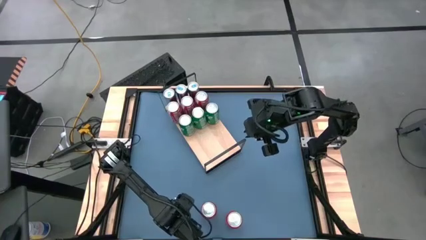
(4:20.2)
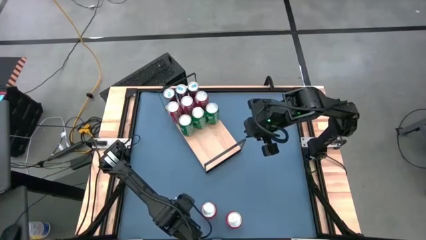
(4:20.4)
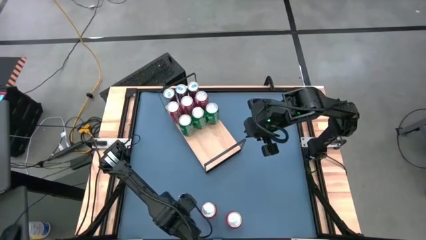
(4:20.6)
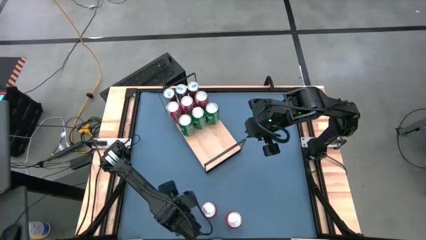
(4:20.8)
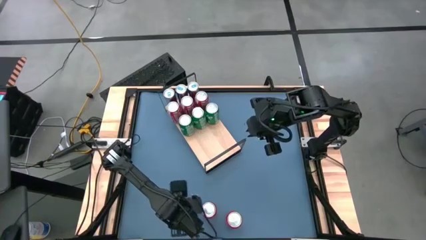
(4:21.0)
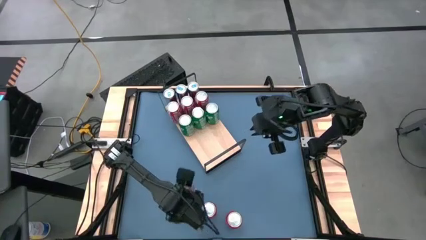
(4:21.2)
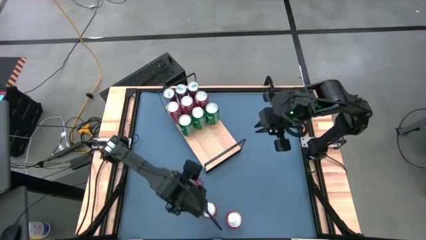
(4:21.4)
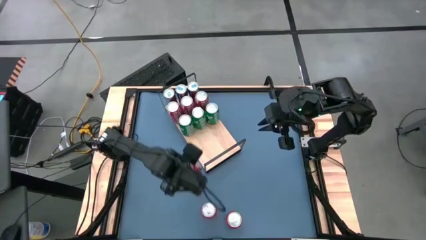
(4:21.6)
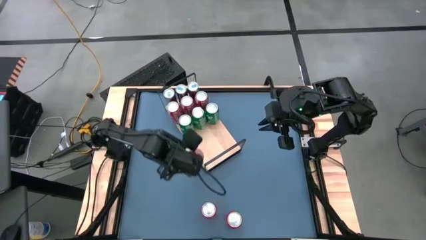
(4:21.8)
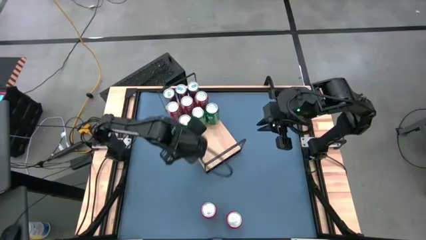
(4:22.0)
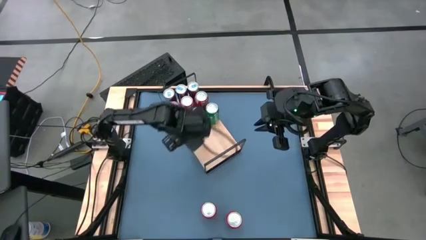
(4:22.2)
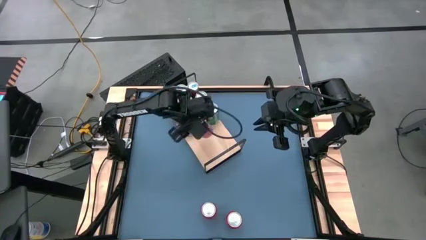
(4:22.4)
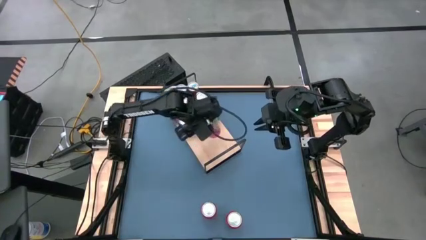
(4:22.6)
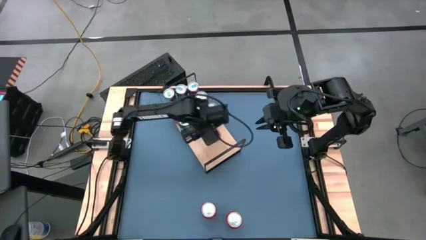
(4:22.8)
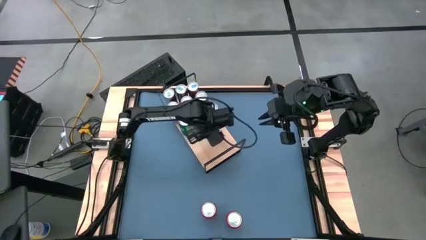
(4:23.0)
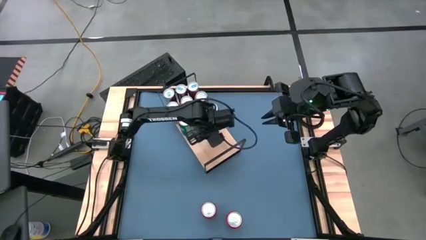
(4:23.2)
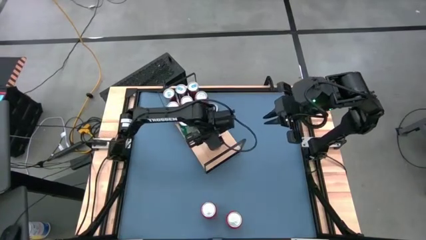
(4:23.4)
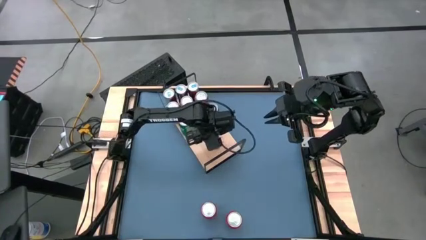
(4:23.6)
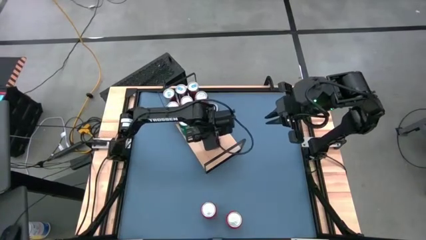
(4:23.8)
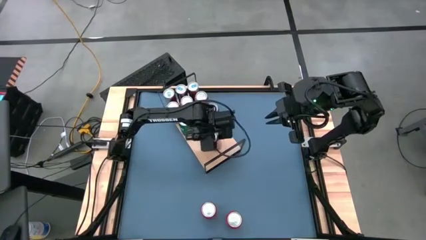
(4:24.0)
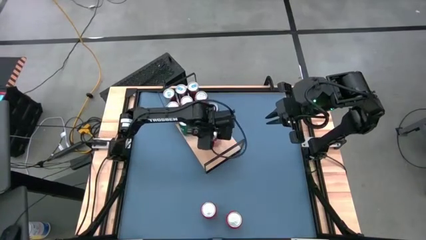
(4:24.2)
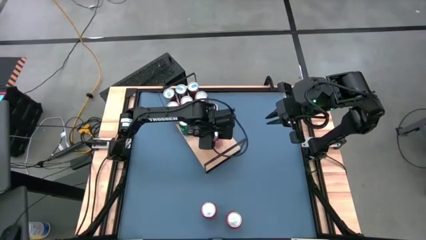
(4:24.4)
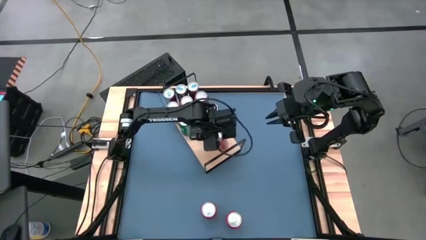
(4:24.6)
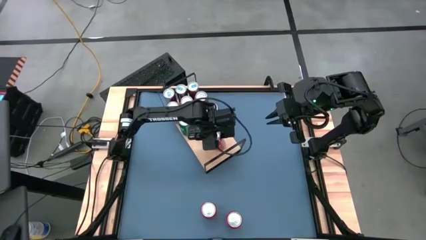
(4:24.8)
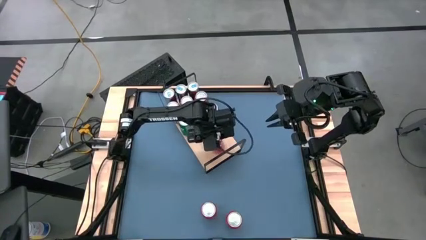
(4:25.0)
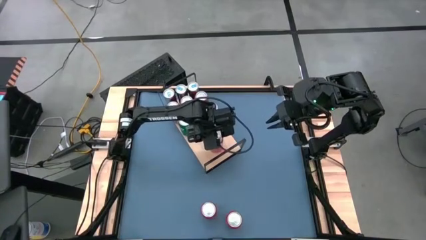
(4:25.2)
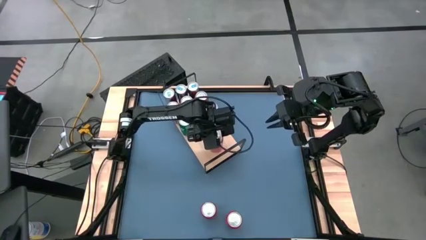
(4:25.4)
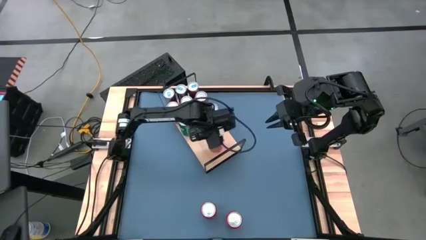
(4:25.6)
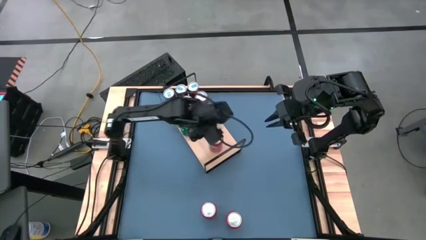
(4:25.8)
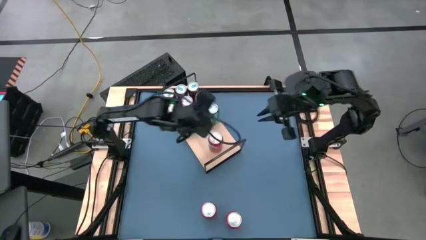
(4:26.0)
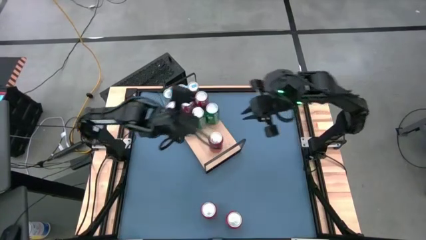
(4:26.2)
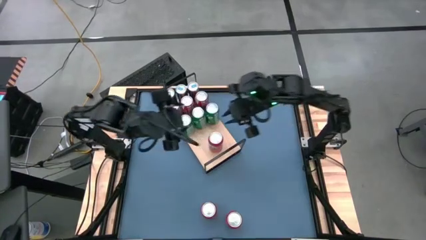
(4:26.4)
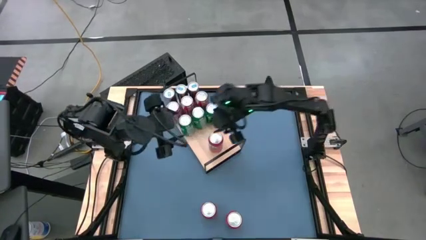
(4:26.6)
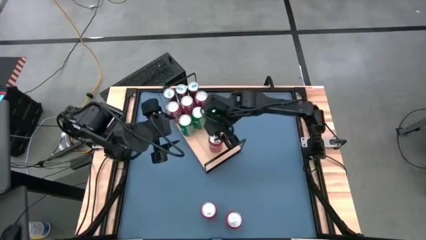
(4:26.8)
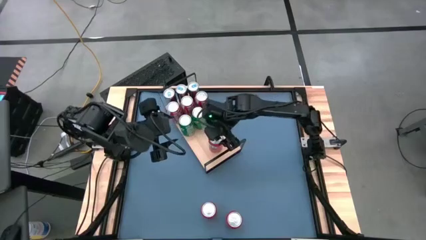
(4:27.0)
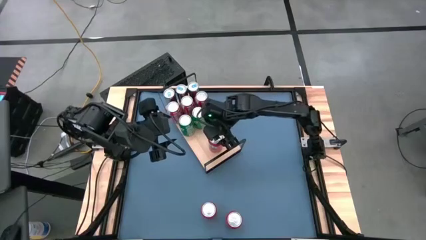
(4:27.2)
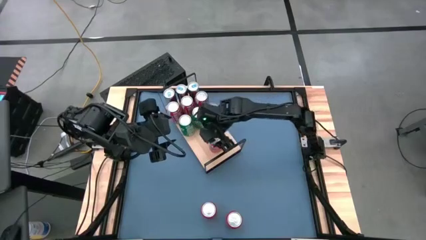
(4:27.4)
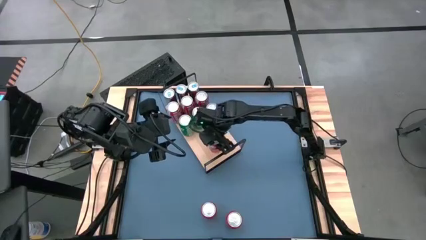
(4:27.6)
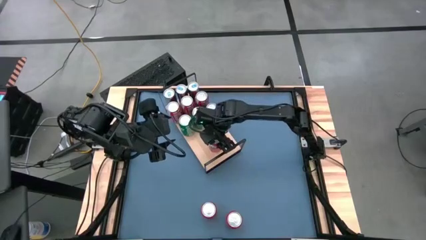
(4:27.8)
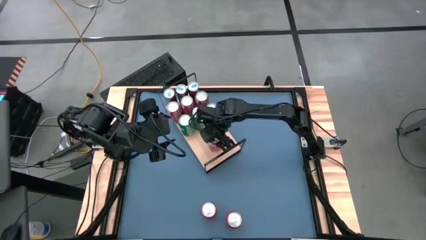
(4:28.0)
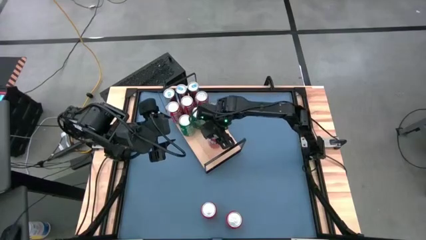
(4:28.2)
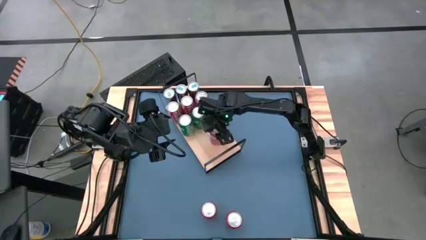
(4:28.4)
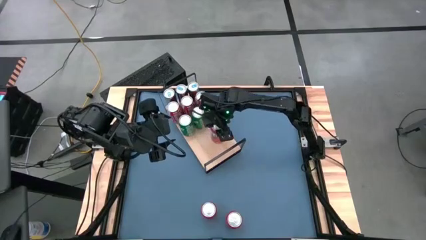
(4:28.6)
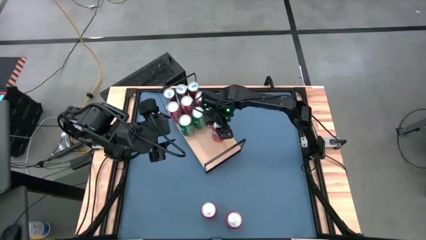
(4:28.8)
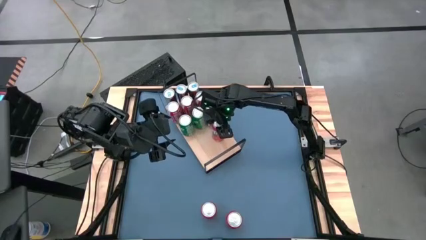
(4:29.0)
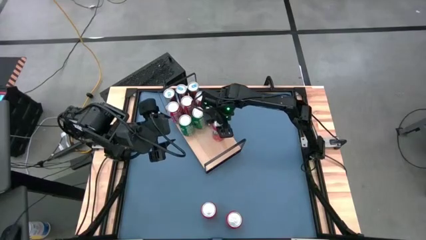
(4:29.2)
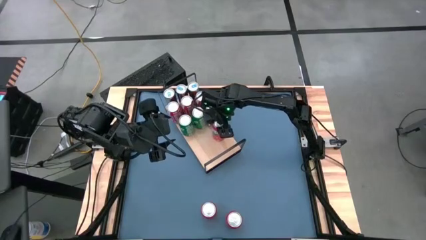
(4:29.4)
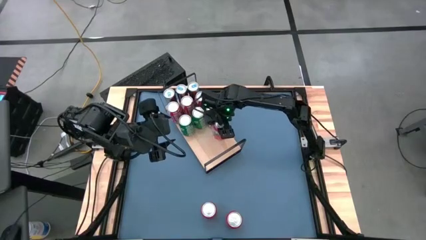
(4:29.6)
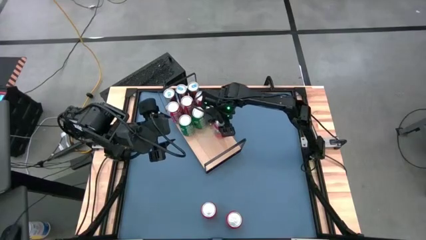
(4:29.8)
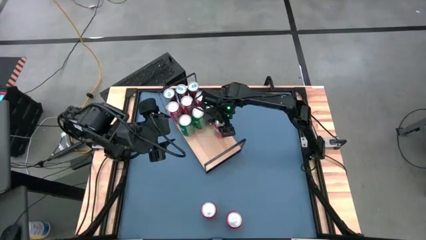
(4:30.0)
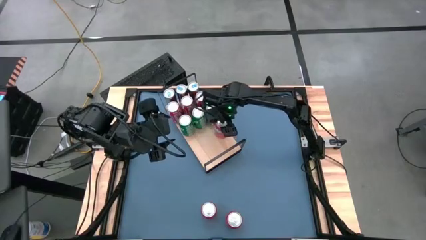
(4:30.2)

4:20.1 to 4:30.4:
Task: Place canned beverage on shelf
Put the left red soda can on the shelf

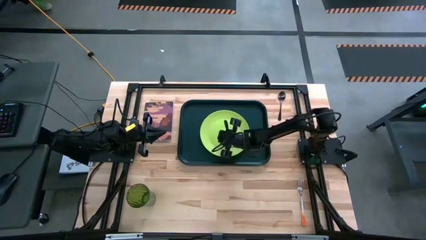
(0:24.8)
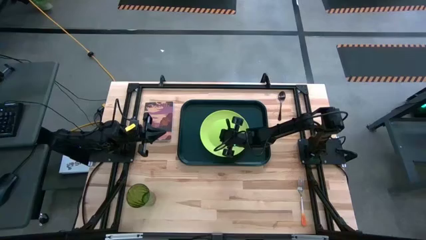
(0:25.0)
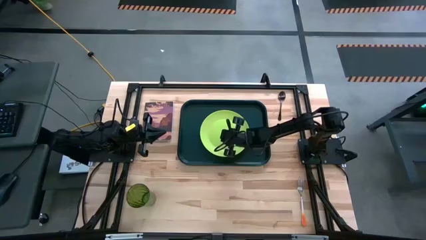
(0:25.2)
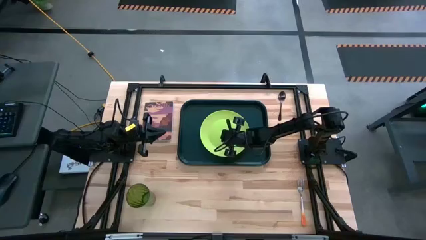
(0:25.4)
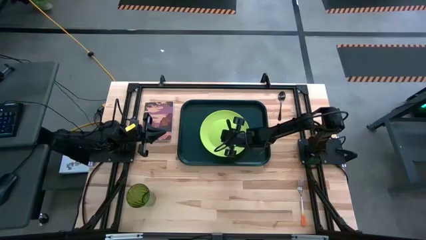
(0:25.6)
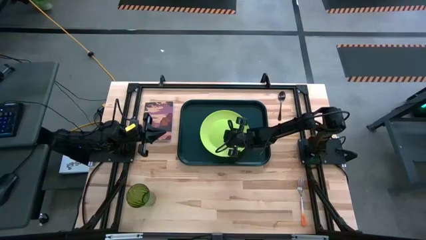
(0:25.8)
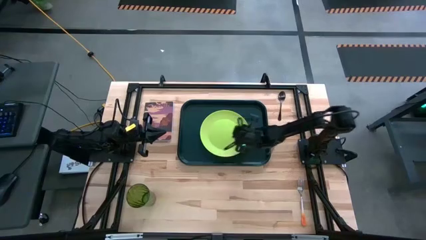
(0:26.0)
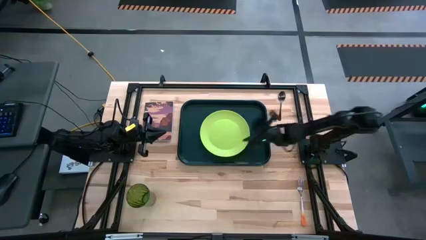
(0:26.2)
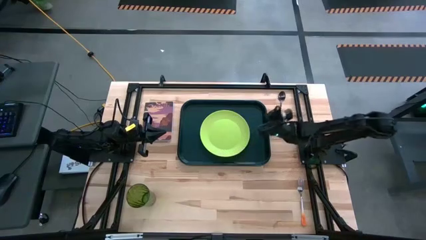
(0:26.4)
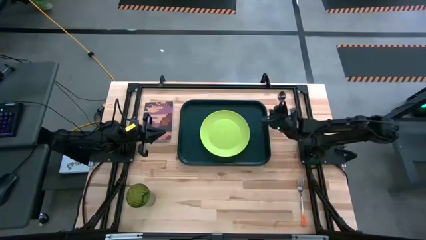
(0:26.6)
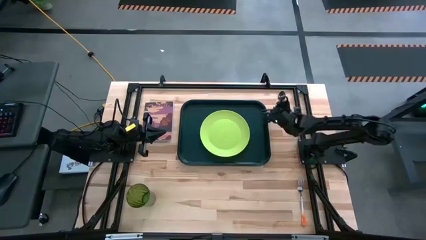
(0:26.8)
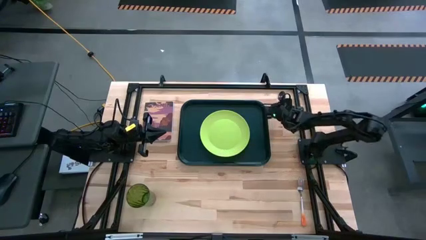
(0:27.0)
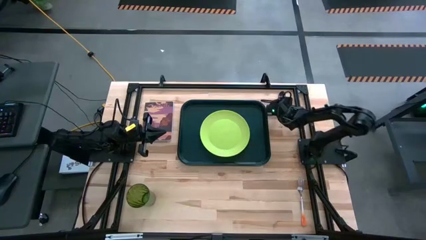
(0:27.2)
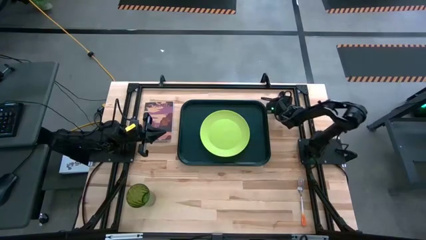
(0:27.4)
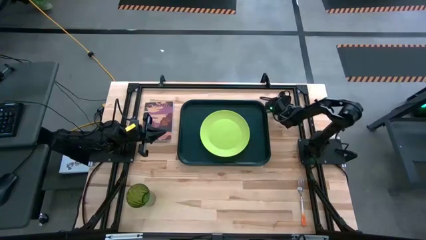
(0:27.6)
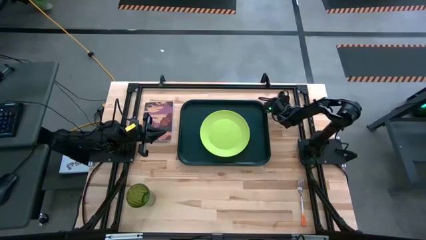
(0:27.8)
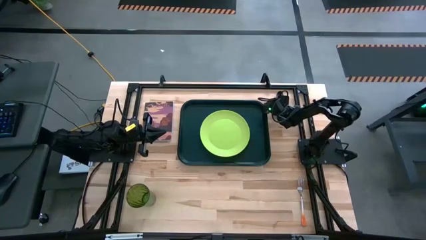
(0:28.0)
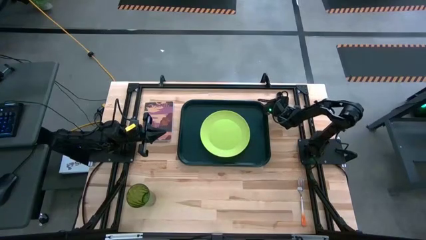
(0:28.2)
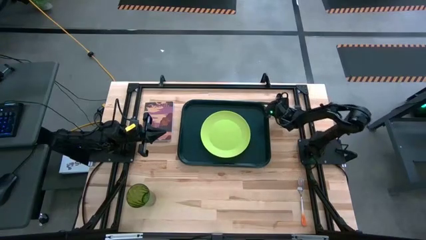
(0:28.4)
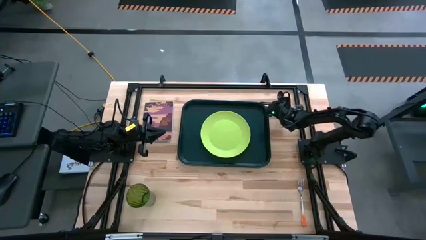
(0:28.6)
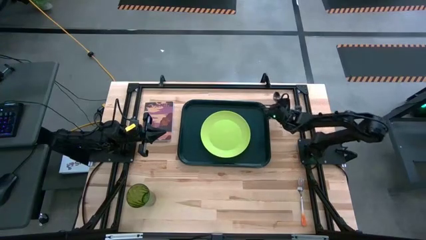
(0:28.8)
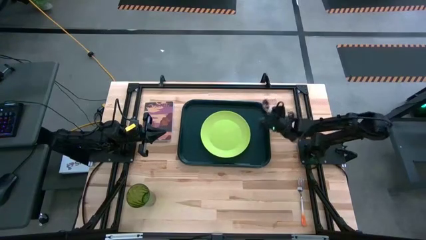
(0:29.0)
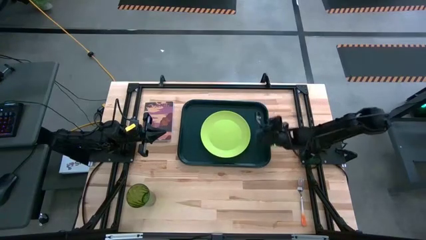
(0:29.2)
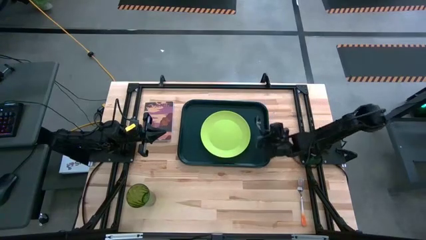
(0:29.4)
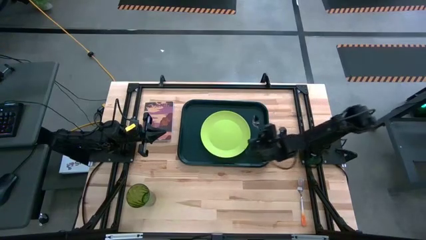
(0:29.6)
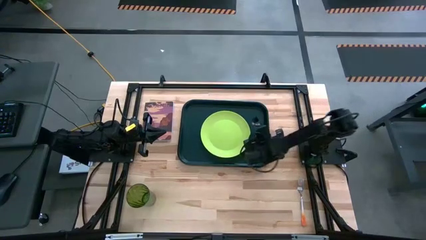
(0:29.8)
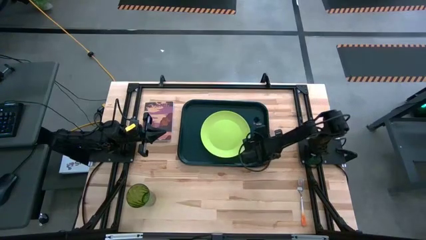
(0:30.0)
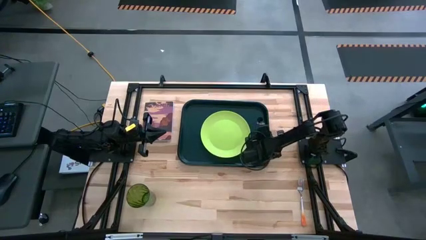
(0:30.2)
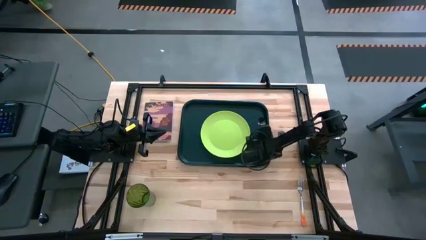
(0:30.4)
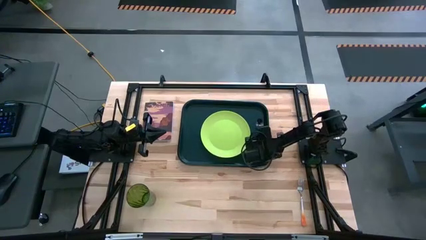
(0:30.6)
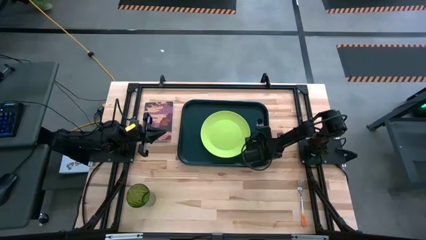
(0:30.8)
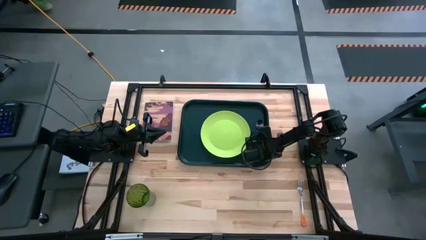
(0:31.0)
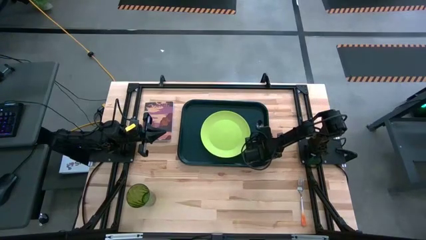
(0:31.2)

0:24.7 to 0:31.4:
Task: Pick and place plate/cup/fork/spoon on tray
Put the black spoon on the black serving tray to the right of the green plate
